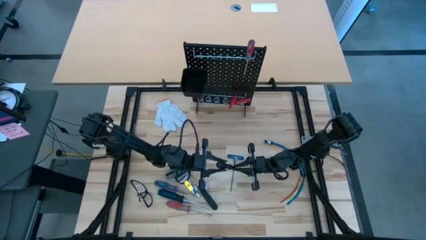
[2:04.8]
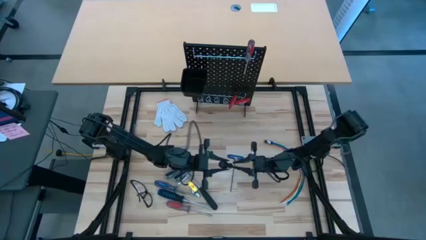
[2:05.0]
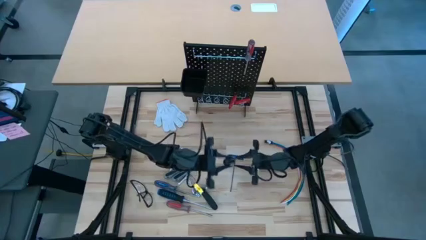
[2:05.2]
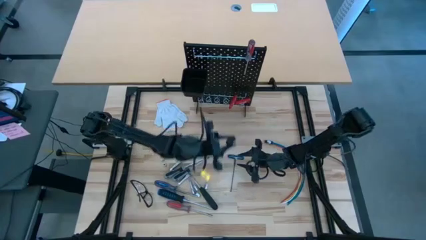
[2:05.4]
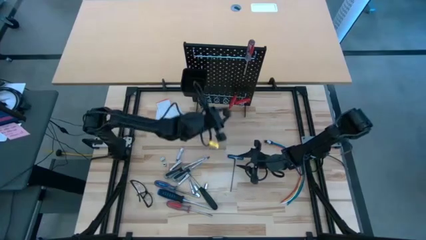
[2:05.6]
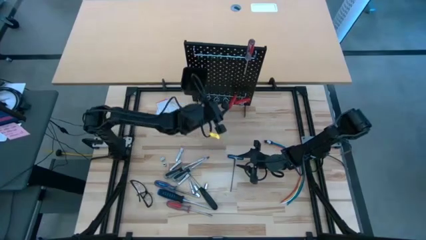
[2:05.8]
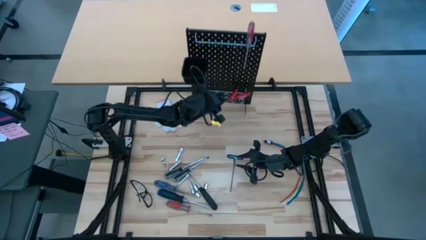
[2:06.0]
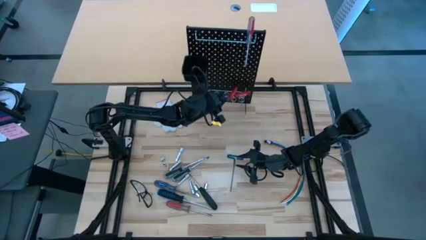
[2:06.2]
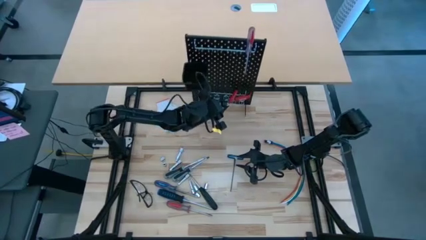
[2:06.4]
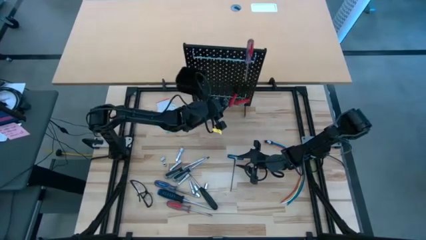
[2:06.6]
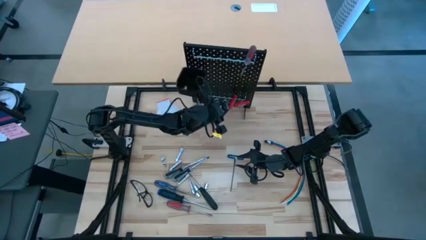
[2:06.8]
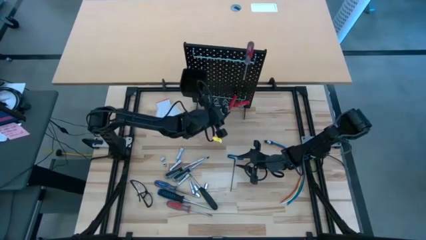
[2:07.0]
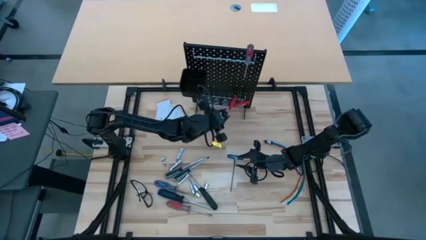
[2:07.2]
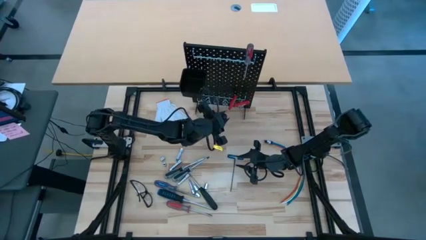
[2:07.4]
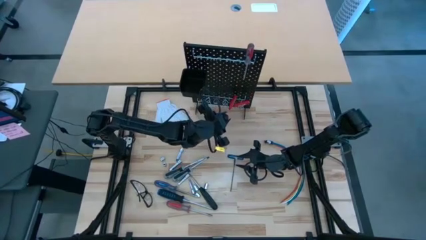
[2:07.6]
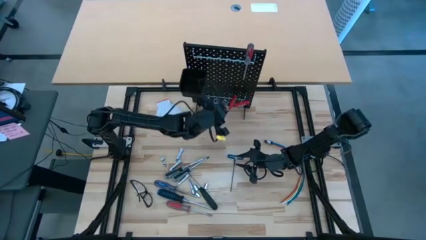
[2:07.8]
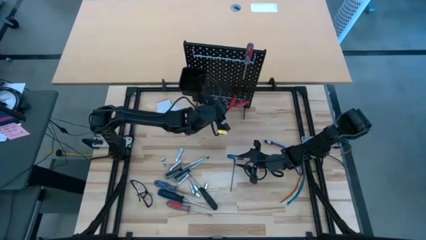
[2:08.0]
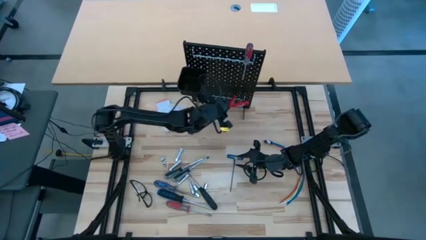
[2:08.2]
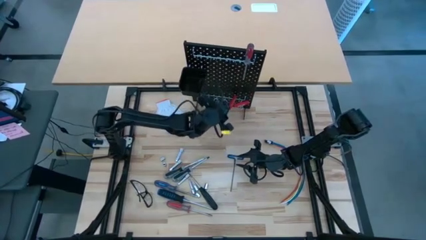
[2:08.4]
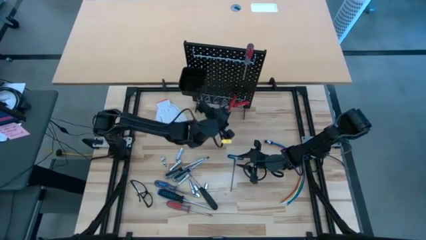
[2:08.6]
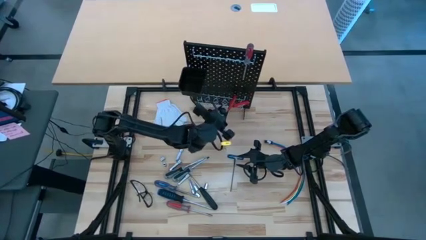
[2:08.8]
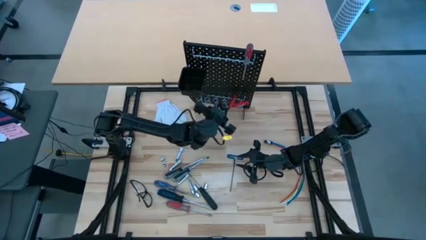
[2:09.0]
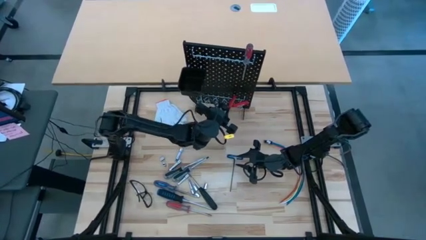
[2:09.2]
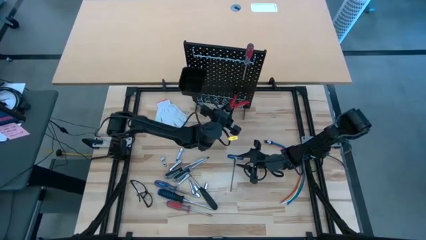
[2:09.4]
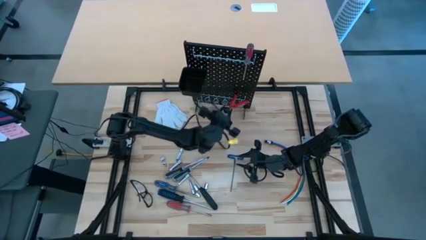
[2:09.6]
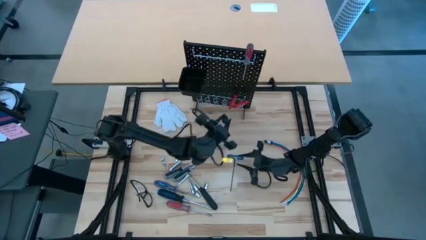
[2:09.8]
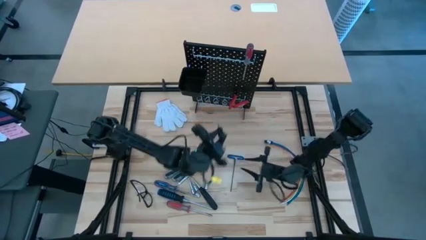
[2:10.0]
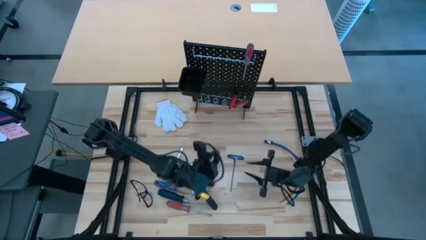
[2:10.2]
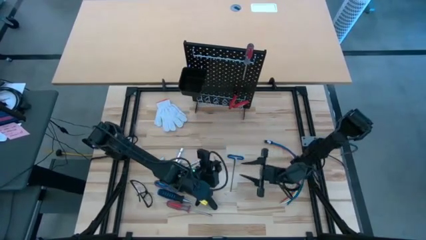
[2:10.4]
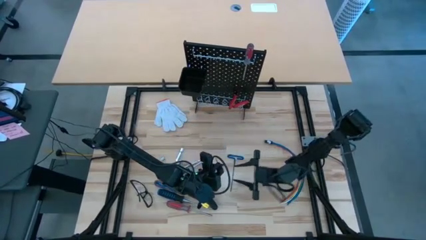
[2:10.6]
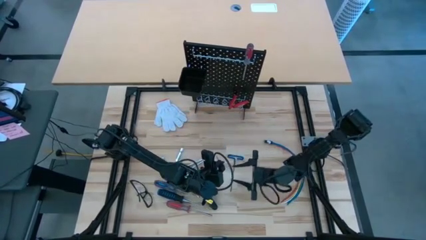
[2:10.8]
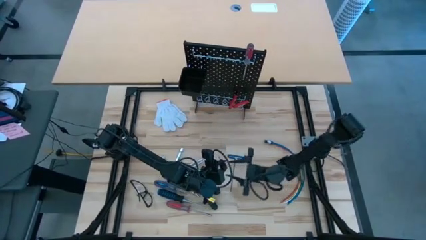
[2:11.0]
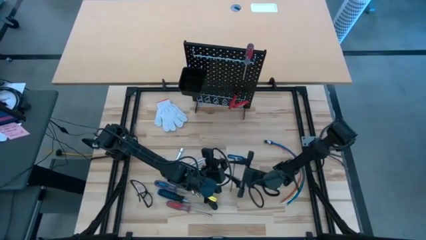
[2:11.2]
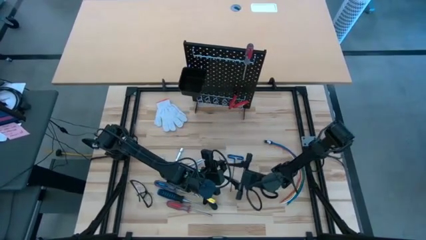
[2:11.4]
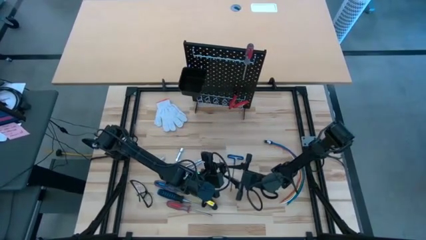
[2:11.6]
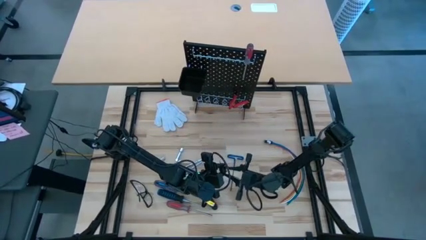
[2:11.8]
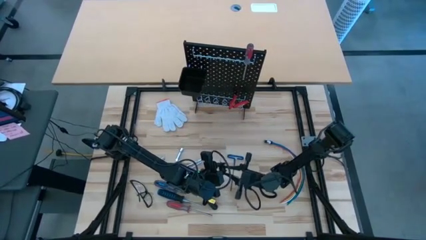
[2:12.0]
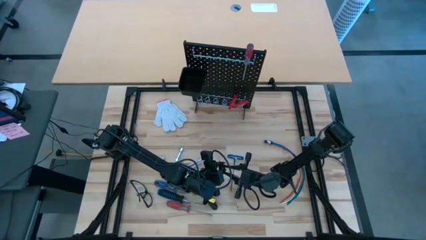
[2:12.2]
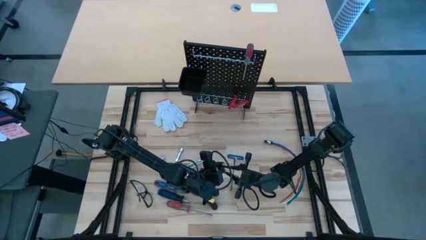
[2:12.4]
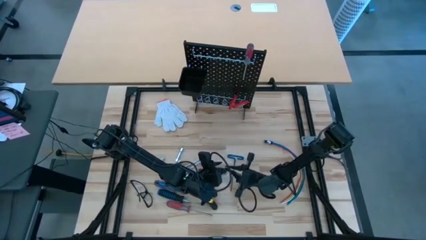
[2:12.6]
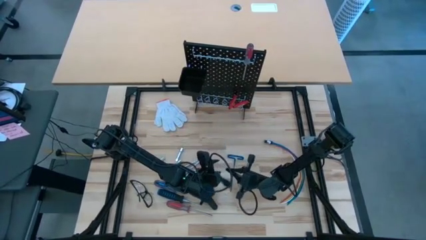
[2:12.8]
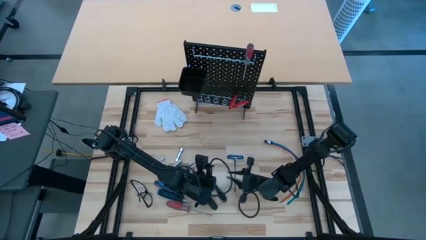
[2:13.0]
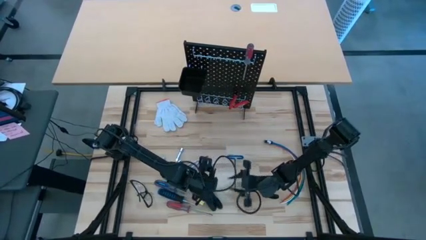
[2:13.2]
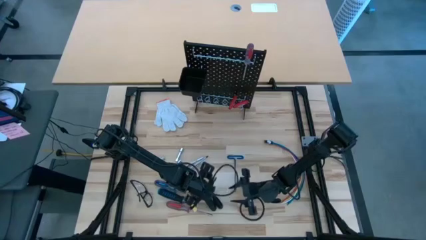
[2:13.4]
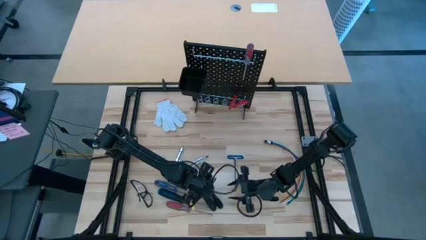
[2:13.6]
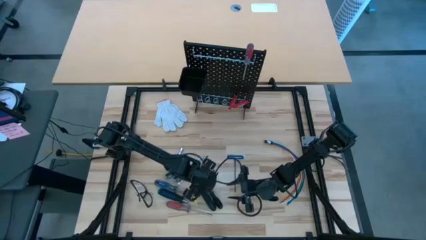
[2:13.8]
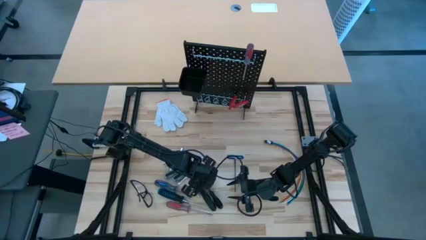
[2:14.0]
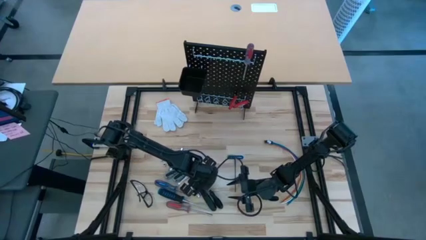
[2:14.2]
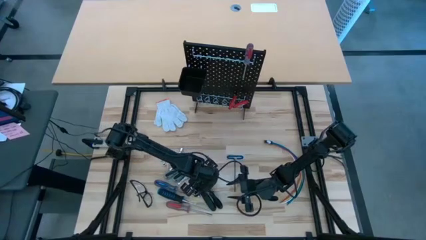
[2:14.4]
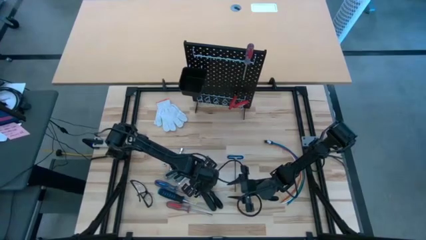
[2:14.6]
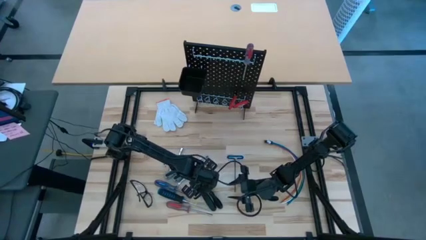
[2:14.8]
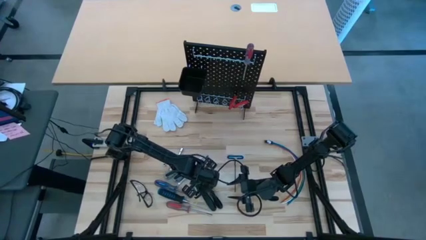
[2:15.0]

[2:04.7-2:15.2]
Task: Hang tools onto peg board
Hang the black screwdriver on the pegboard

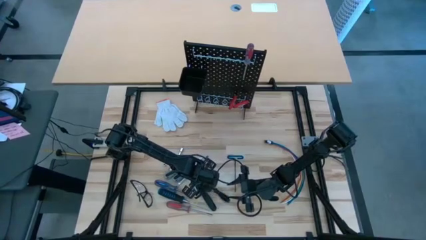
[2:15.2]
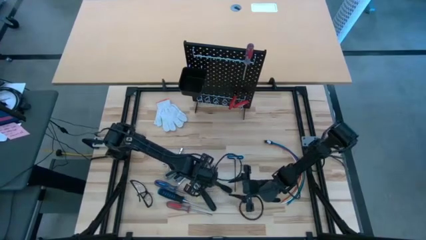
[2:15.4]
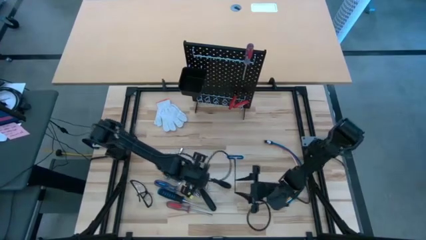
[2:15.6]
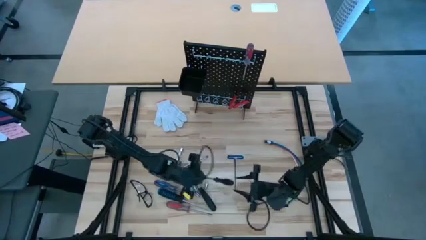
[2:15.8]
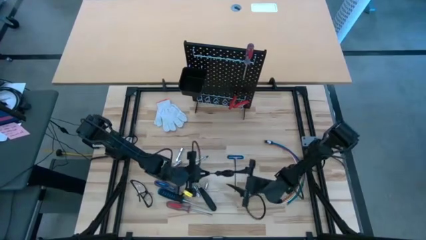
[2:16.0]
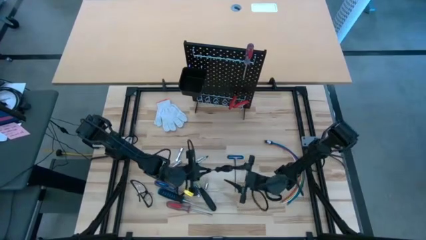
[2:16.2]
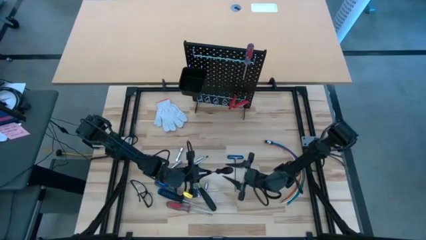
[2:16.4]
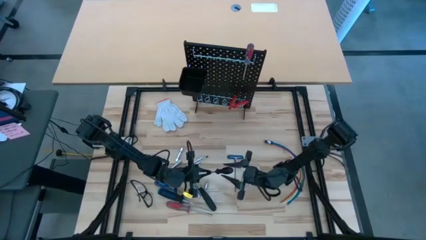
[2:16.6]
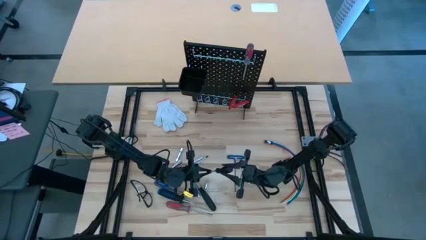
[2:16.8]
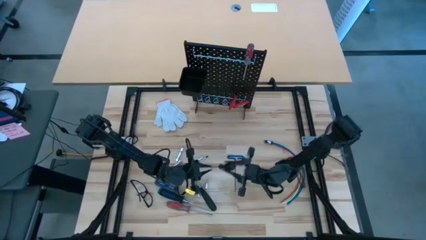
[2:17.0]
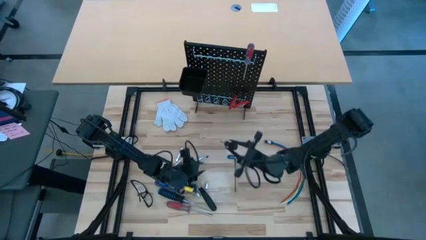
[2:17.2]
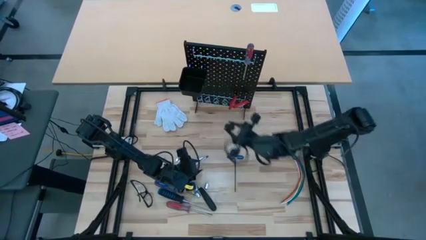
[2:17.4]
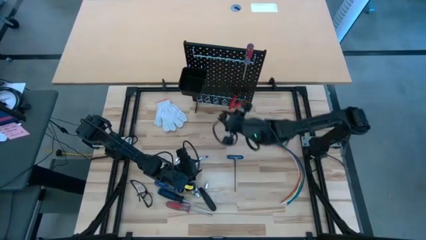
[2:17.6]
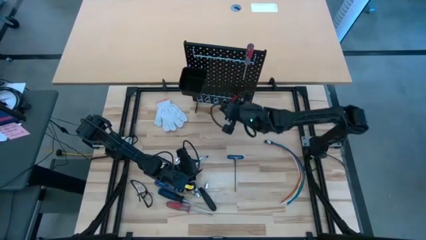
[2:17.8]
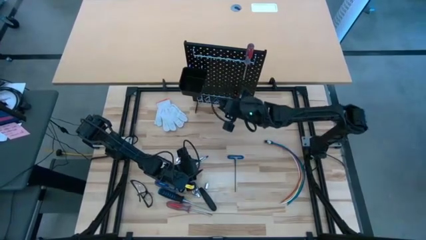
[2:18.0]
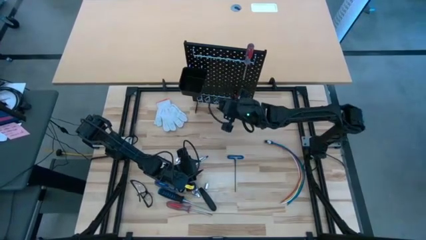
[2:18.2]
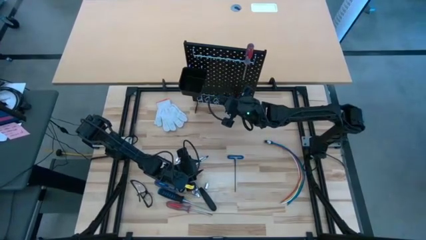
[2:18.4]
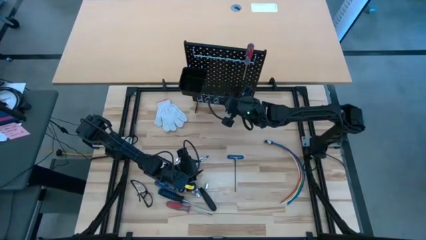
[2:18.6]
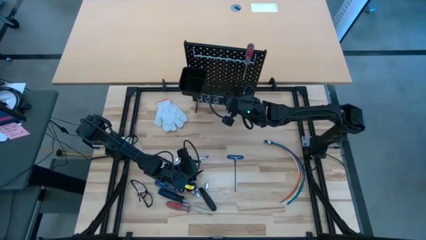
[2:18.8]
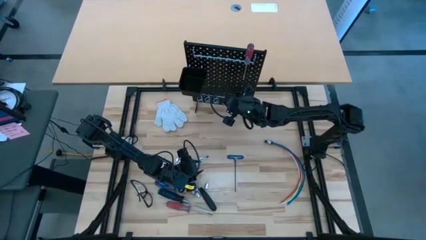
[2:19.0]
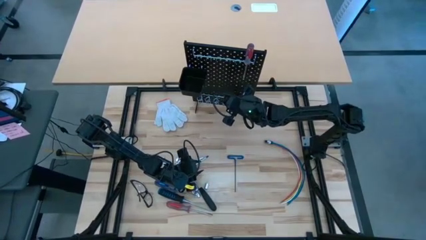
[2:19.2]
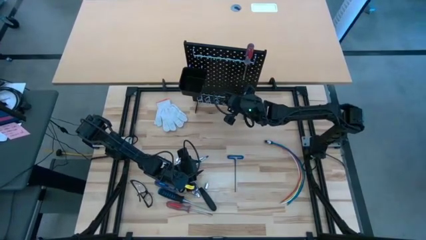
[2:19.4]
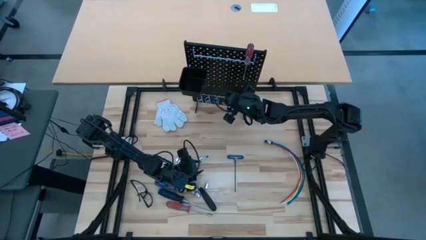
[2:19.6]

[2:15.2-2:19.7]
Hang the black screwdriver on the pegboard

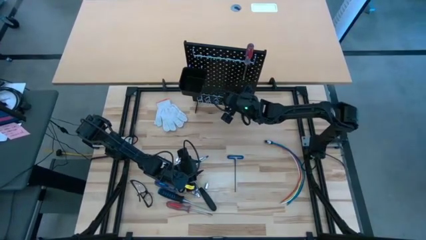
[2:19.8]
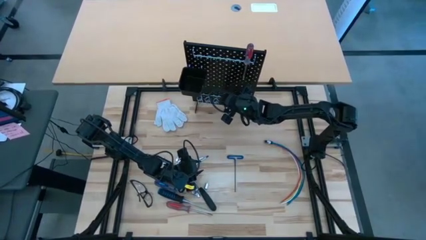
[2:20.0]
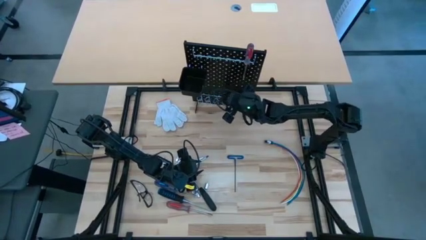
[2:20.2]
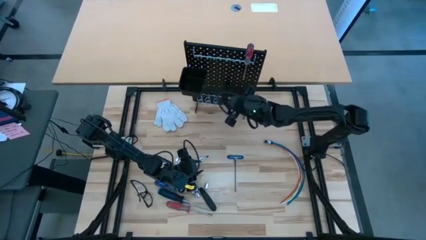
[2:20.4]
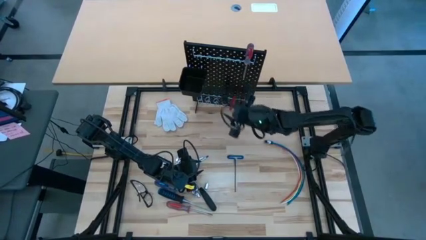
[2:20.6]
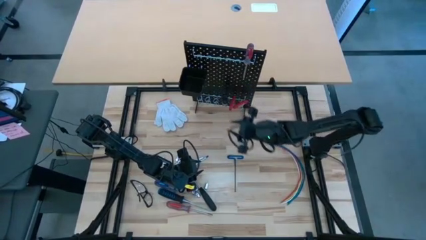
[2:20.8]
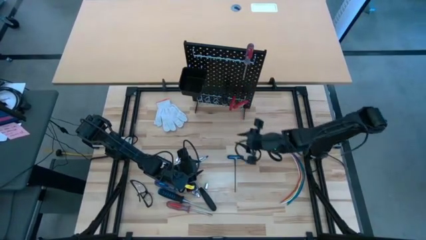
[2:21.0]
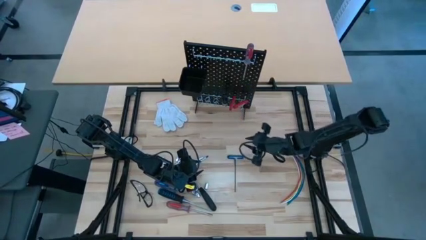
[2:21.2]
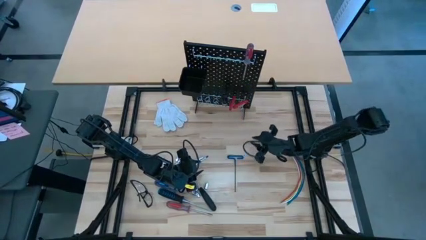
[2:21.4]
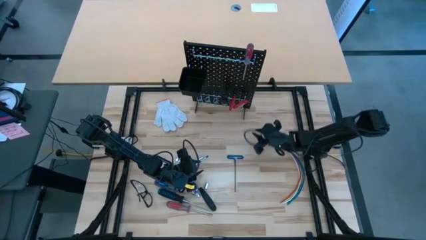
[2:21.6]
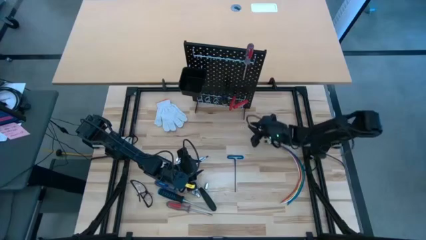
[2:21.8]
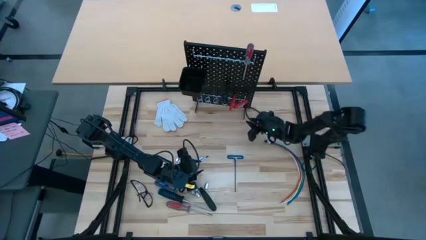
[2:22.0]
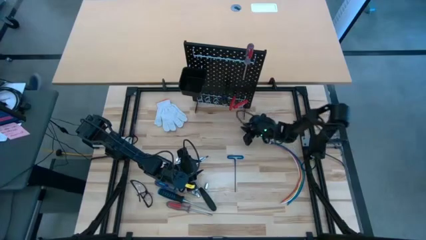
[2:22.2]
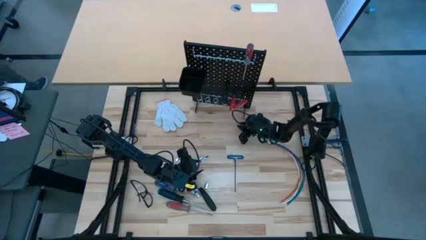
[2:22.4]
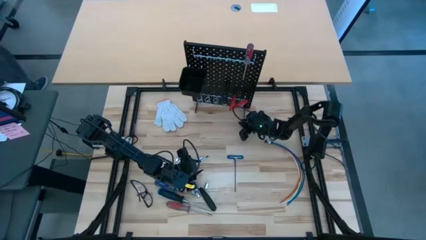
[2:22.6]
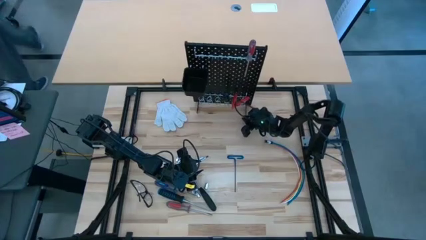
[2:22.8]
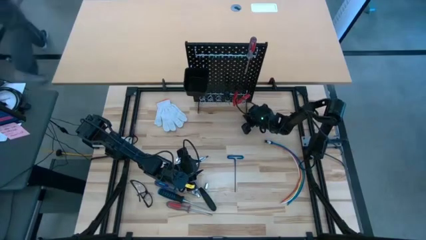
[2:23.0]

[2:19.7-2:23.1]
Adjust the pegboard
